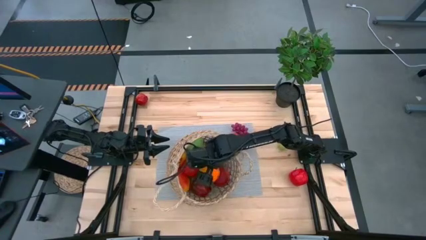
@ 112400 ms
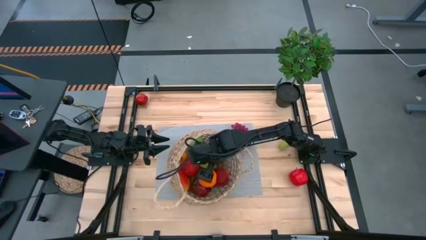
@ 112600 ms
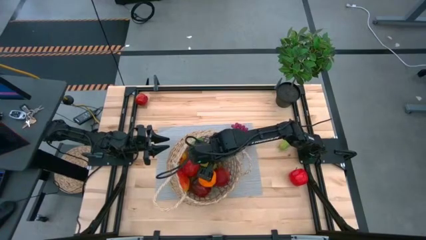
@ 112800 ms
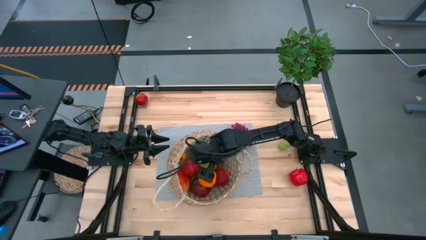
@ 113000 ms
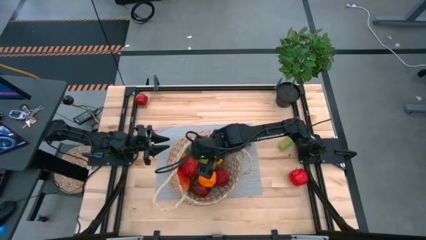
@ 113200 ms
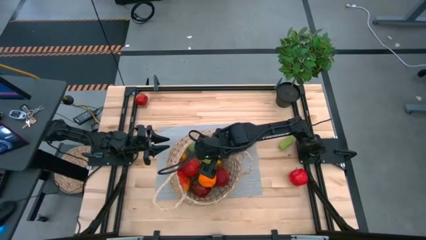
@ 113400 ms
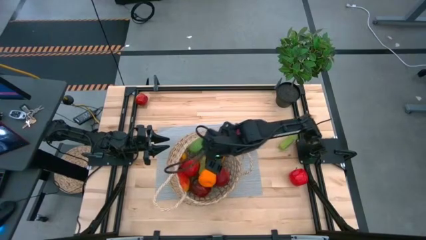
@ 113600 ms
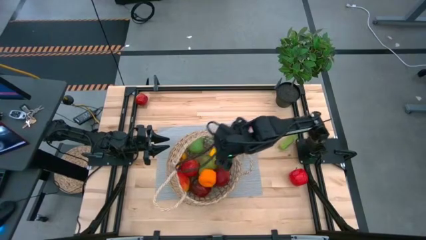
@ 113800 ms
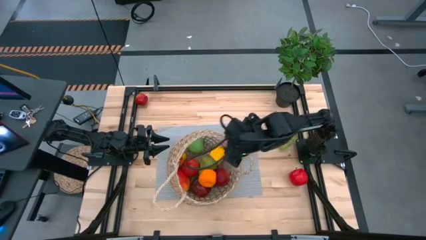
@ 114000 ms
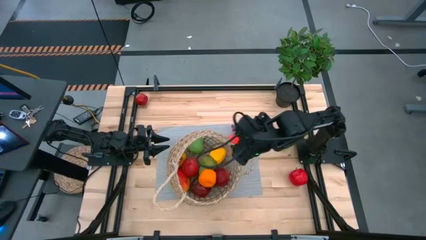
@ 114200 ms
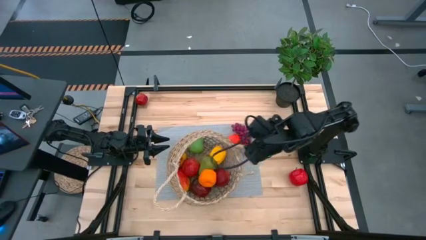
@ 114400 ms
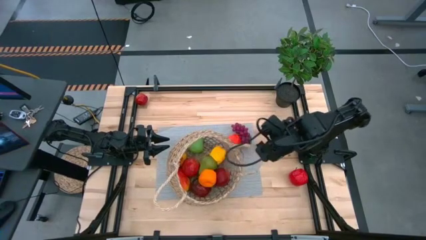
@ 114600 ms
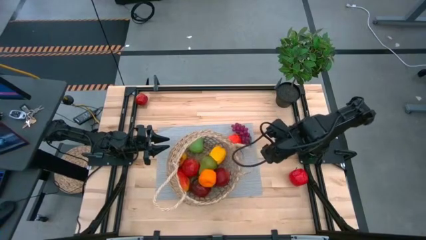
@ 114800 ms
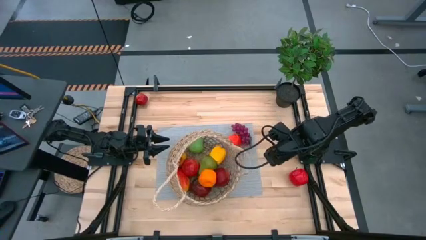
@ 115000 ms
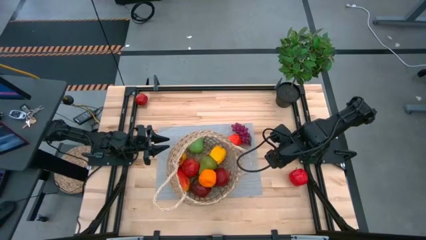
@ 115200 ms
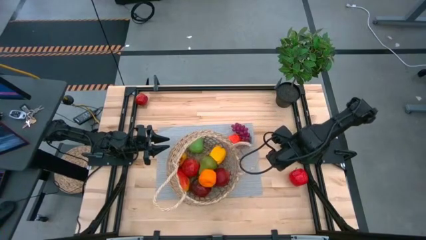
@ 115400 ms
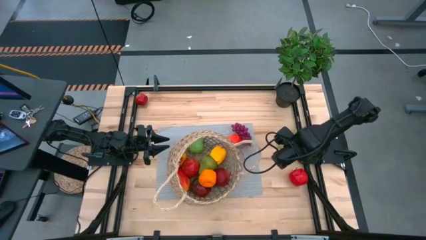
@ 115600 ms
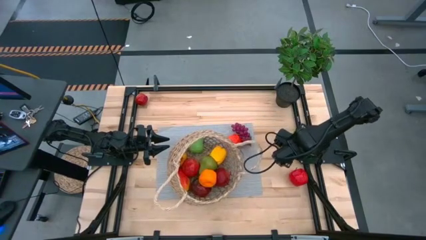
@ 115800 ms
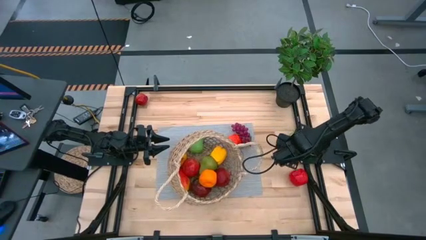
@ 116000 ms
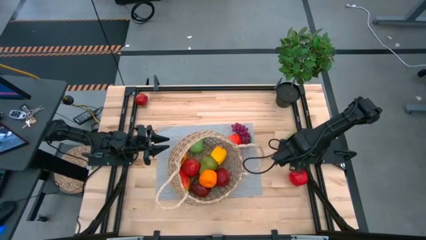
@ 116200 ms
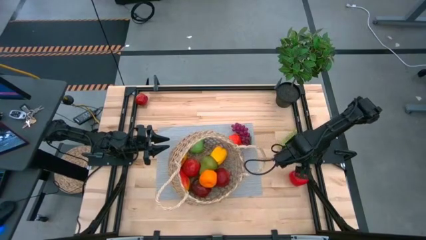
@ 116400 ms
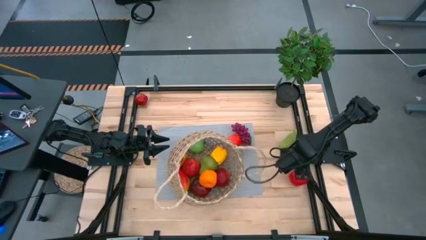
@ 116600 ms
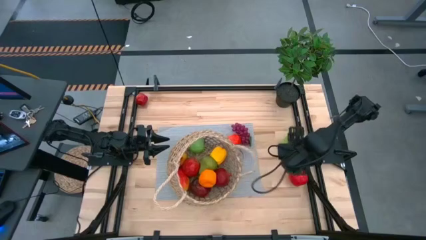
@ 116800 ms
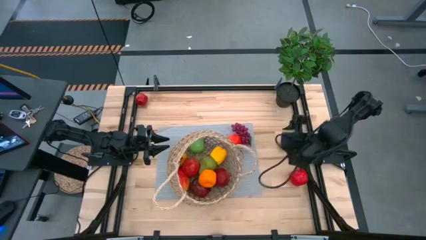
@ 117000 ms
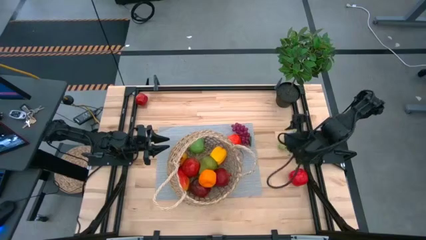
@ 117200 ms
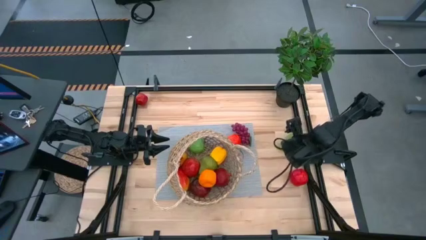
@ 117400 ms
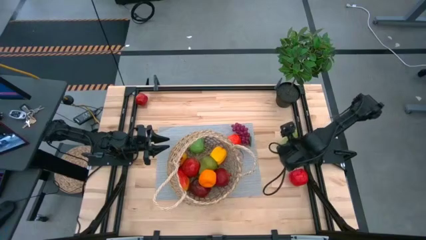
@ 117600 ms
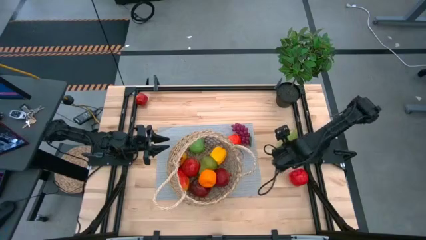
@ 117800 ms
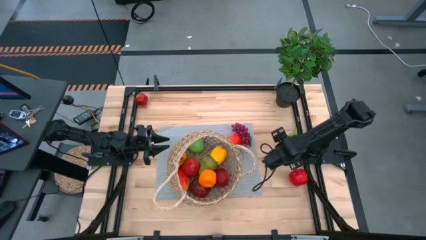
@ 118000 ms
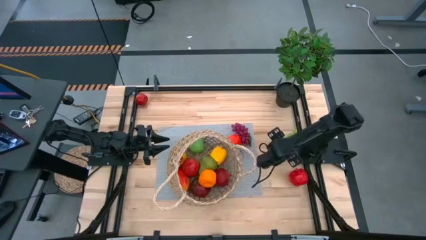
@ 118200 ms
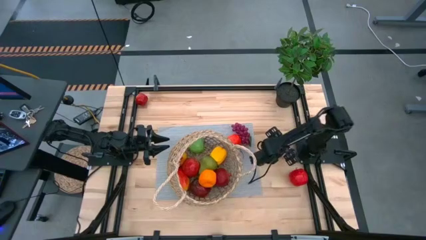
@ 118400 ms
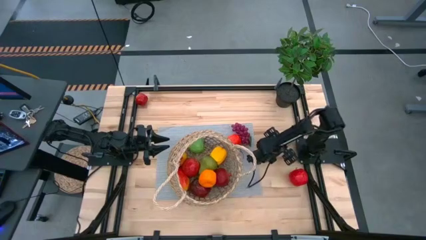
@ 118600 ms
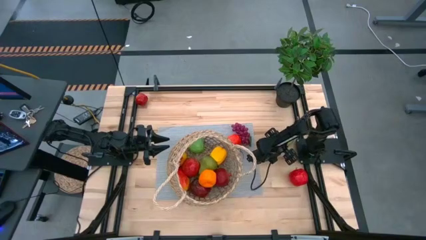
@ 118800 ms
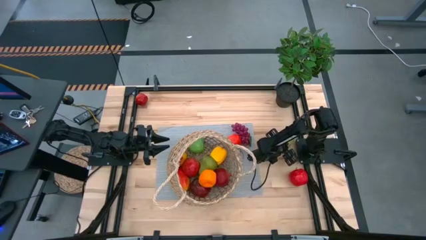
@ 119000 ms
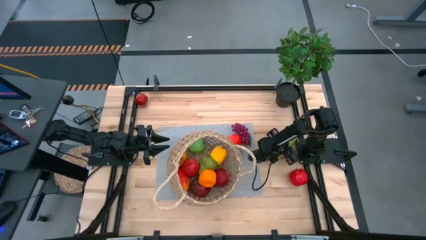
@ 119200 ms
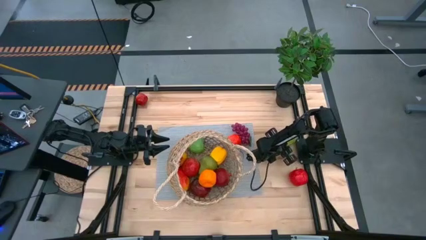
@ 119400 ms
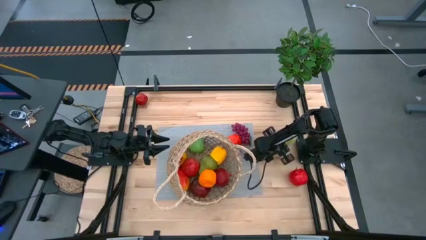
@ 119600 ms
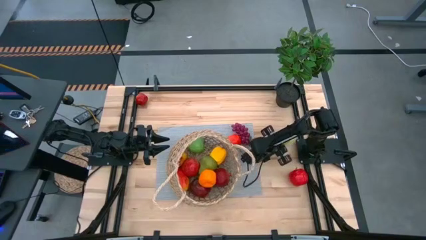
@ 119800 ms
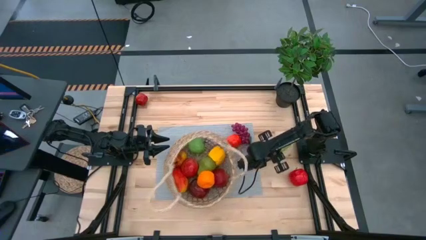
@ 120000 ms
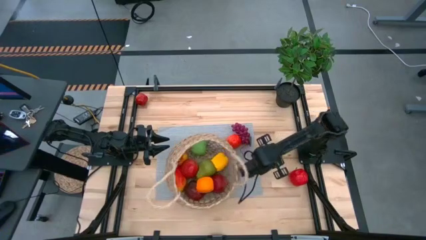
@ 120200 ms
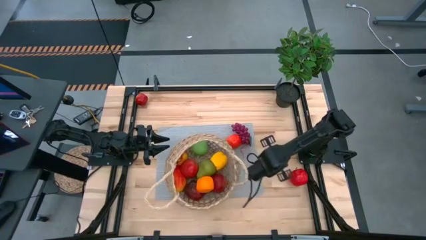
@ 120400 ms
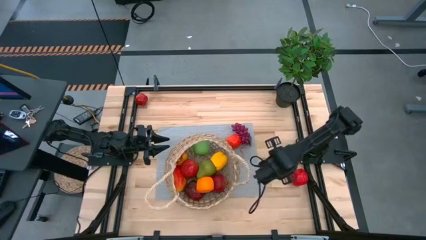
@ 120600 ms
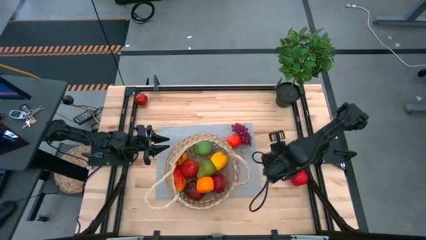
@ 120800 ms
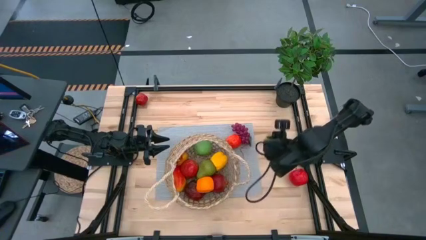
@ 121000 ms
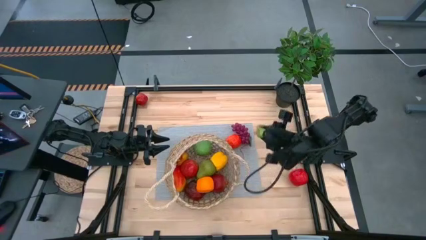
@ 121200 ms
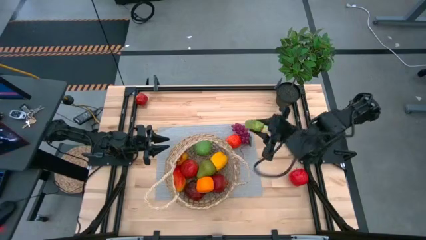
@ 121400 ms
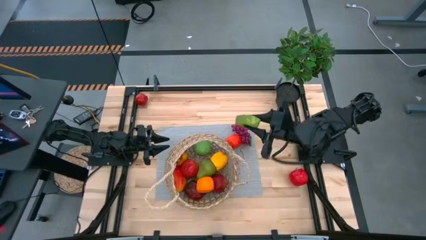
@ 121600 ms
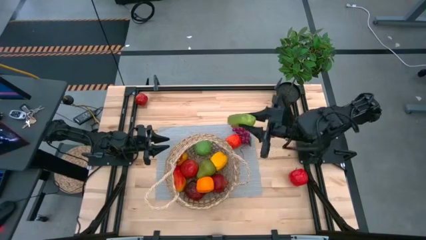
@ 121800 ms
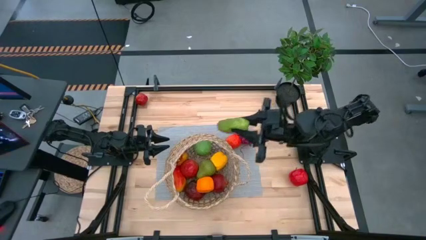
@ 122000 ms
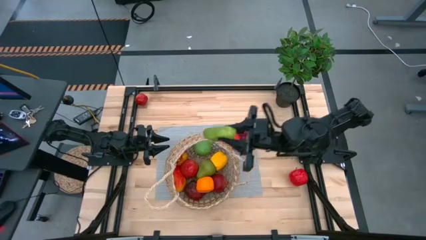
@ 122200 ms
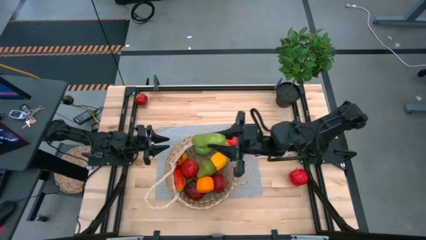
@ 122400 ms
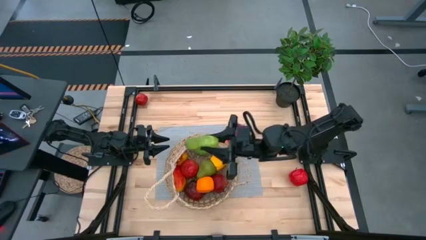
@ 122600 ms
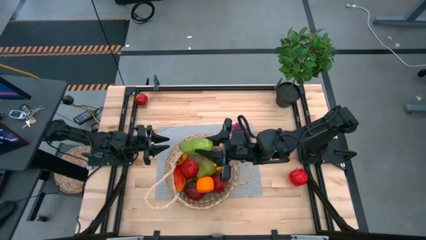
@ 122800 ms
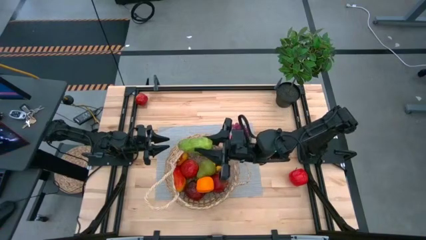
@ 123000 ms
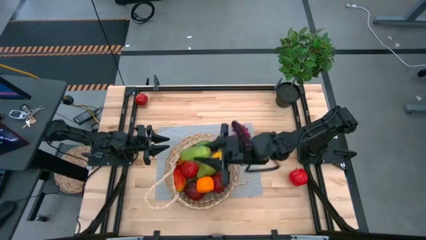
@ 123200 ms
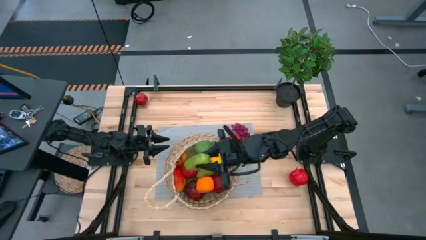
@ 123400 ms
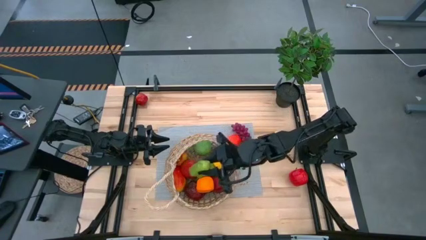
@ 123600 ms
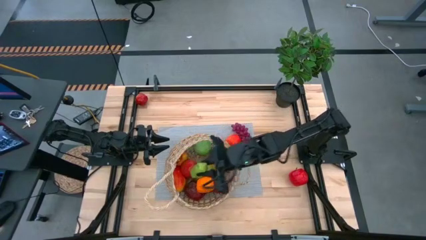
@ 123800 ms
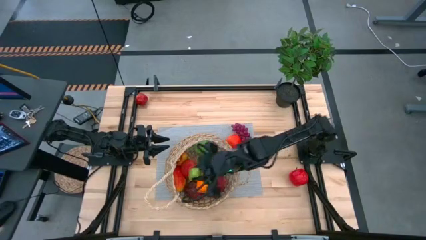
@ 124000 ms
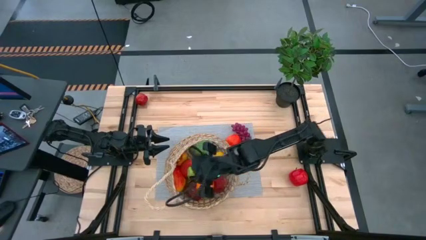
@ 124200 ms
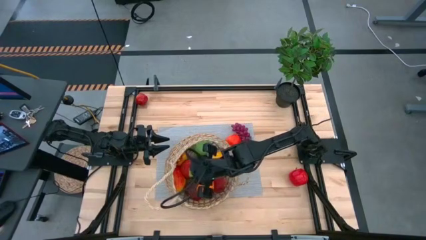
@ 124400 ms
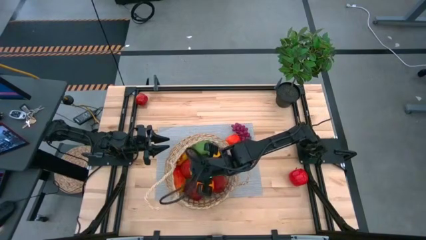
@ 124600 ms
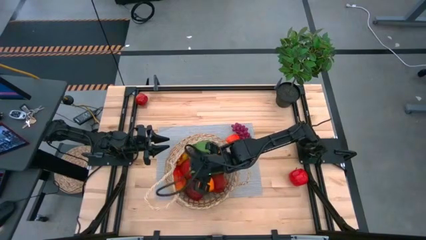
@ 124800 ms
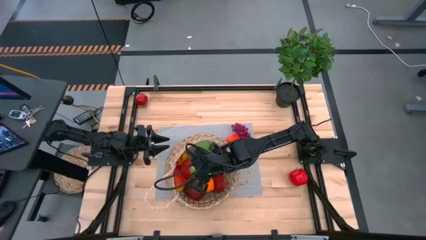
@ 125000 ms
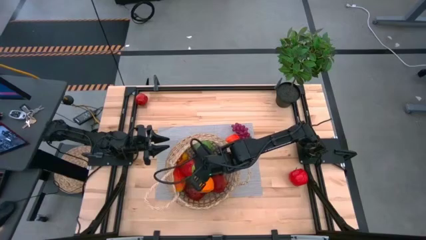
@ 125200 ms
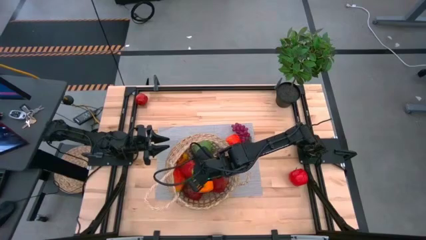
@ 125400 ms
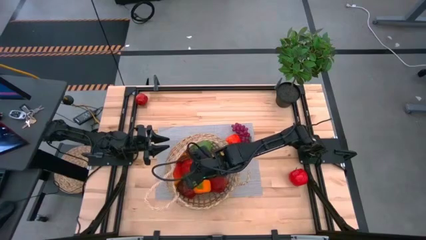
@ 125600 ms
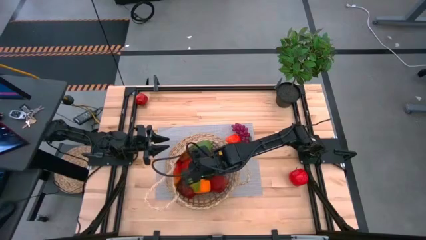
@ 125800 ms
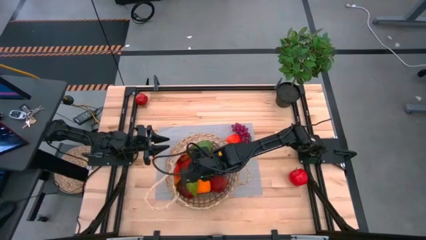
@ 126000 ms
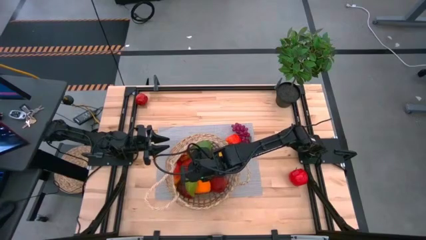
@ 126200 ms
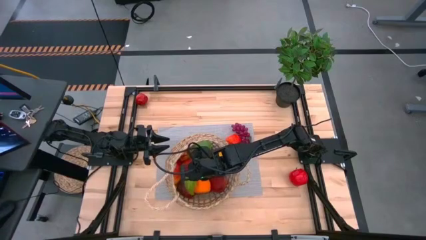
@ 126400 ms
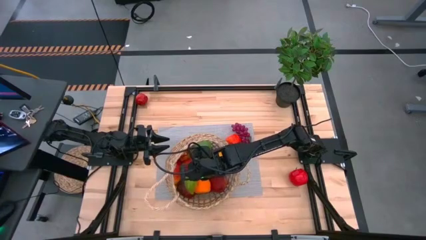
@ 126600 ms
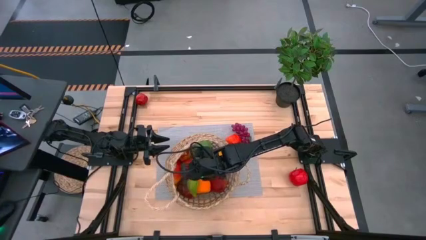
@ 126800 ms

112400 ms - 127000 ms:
Task: Build produce basket
Put the green cucumber into the brown basket

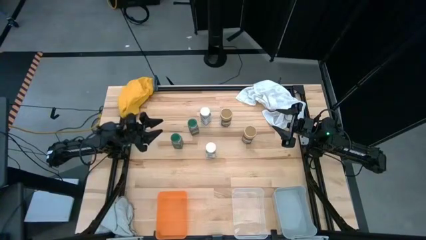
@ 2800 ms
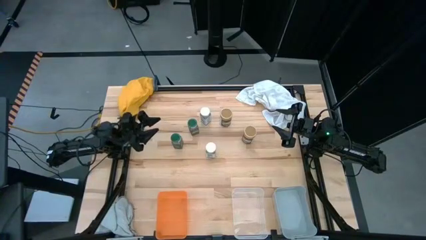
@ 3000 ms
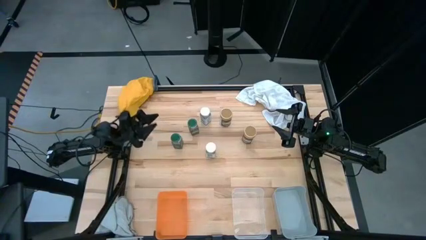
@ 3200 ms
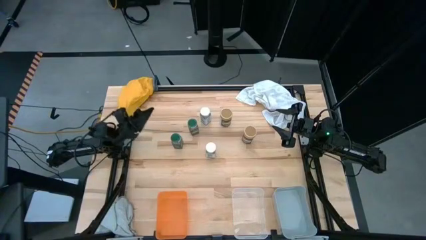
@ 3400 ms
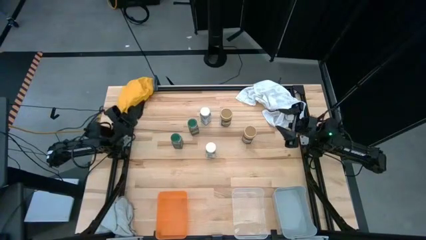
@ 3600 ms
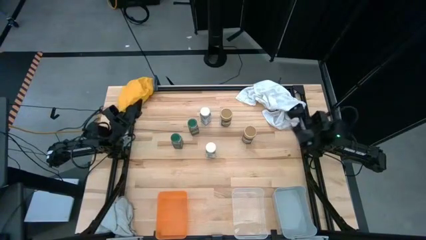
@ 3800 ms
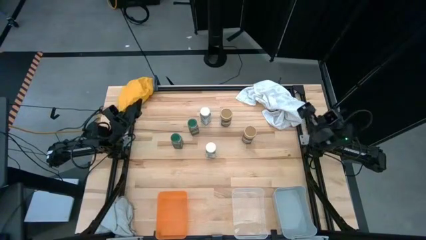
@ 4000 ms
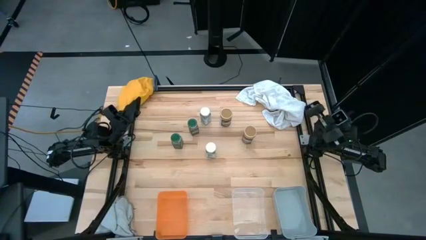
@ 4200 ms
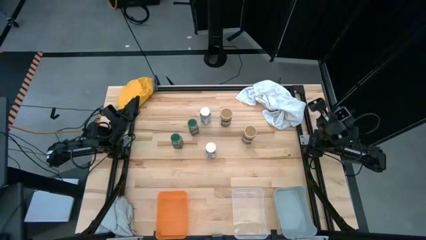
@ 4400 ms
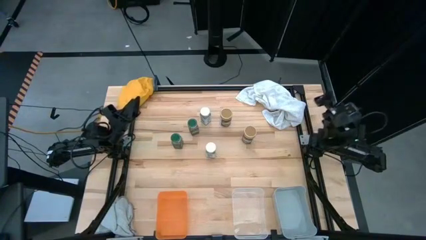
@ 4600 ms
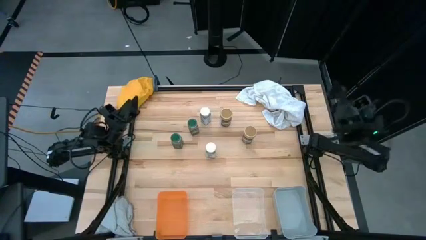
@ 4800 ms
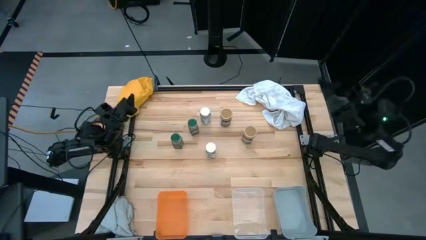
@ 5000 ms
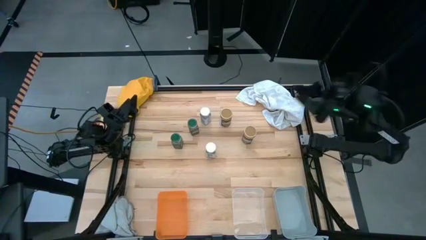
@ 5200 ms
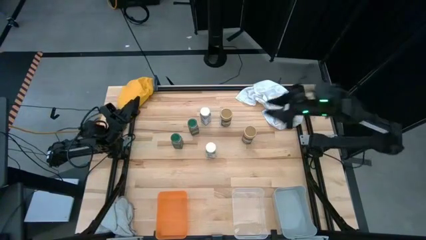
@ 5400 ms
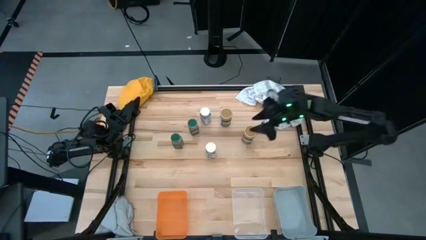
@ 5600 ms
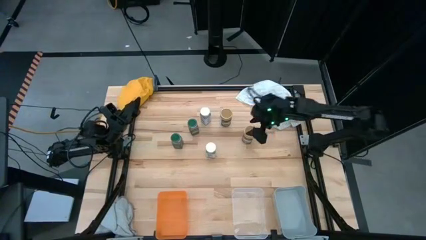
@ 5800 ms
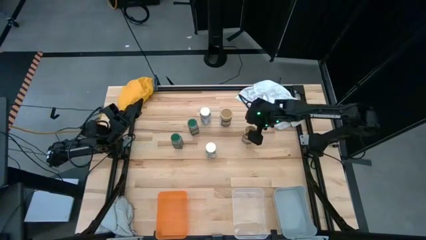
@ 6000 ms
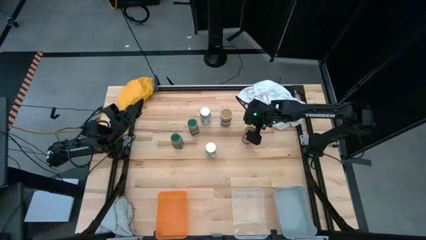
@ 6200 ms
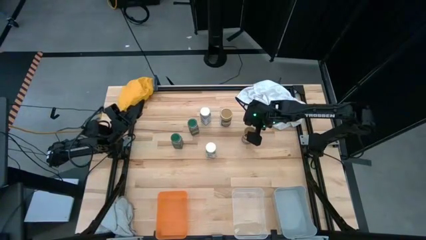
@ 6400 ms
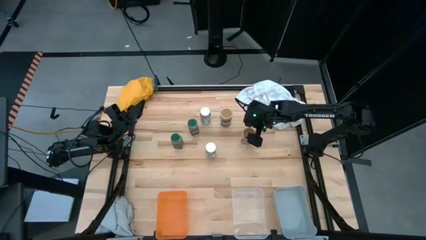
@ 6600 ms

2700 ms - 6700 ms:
Task: Sort spices by type
Put the bottom brown spice bottle into the gray bin
